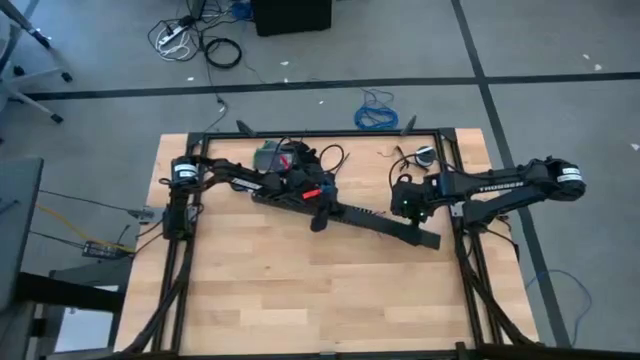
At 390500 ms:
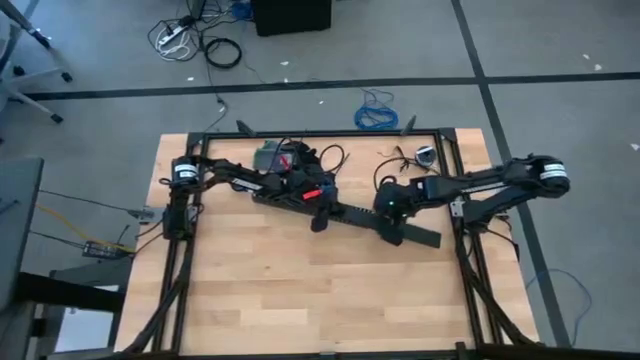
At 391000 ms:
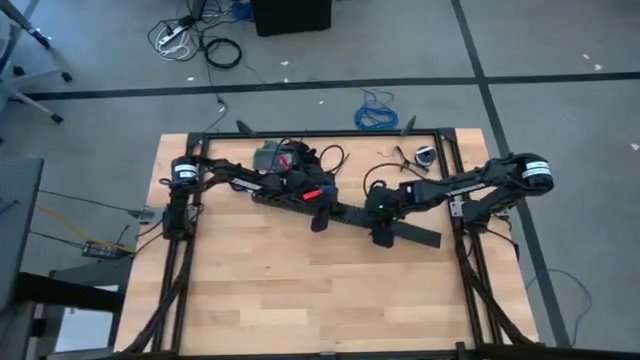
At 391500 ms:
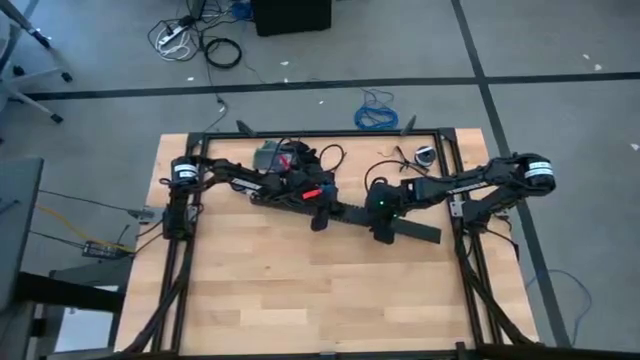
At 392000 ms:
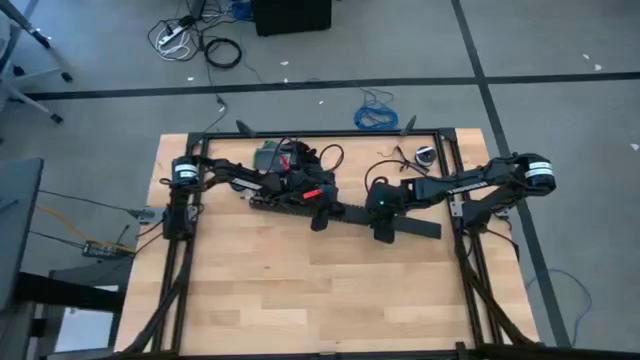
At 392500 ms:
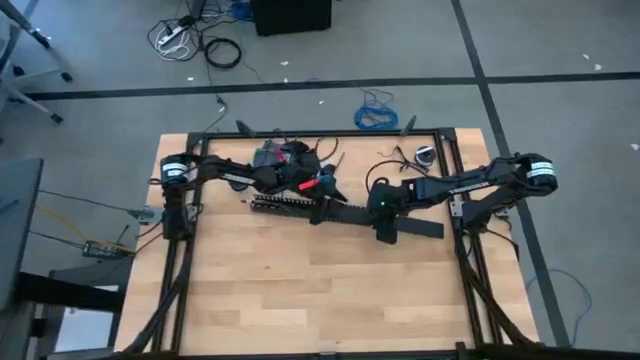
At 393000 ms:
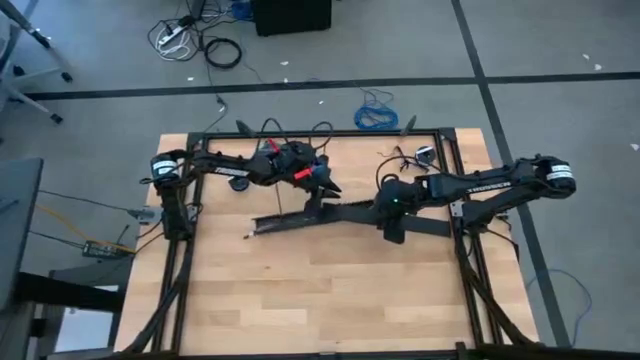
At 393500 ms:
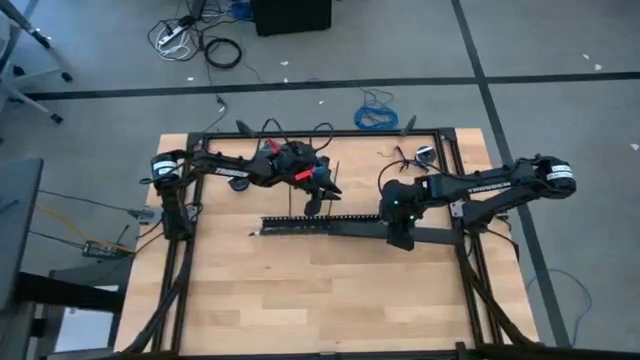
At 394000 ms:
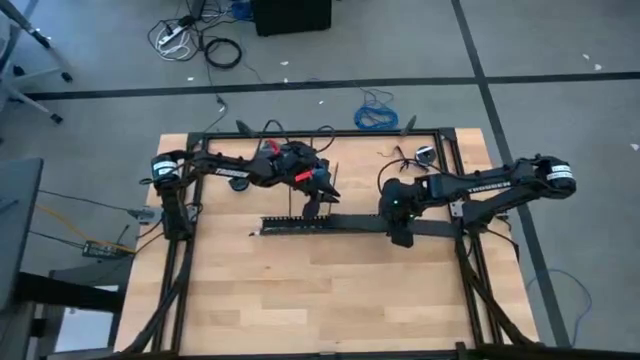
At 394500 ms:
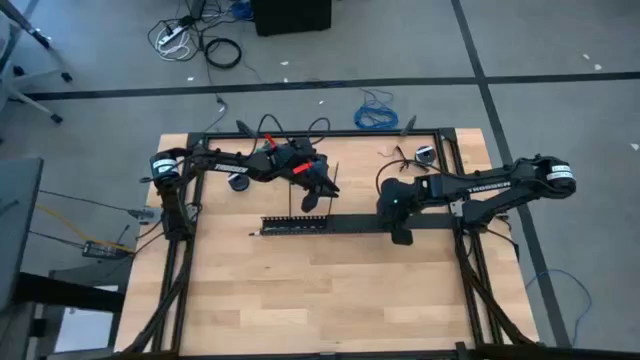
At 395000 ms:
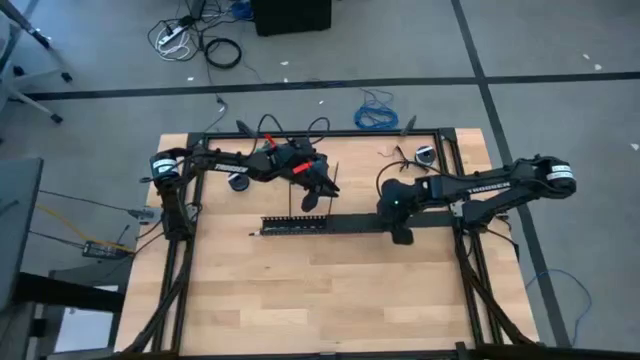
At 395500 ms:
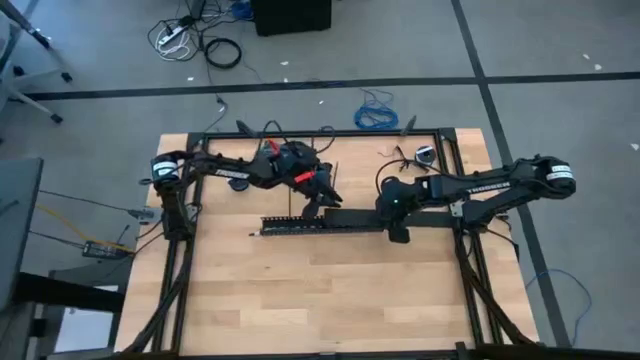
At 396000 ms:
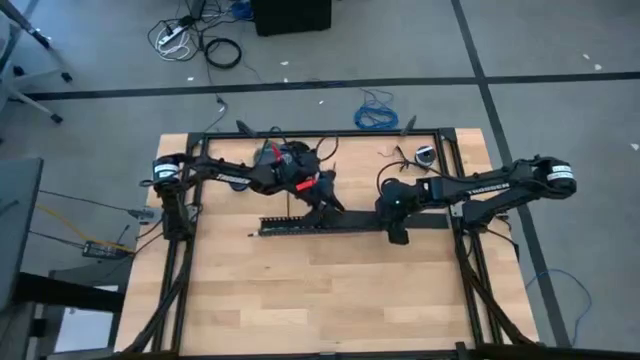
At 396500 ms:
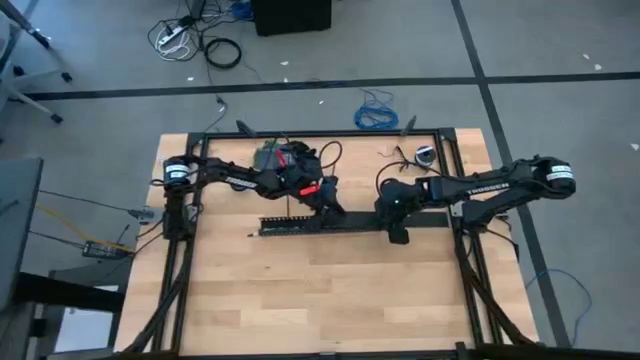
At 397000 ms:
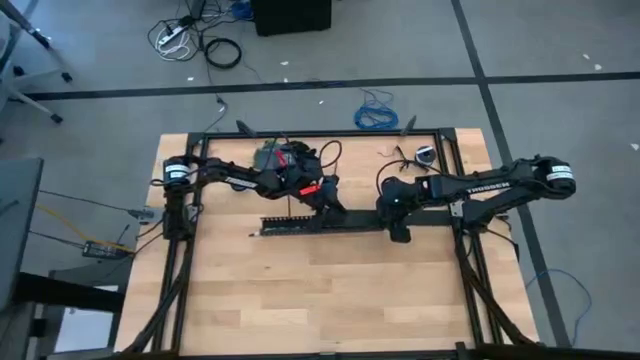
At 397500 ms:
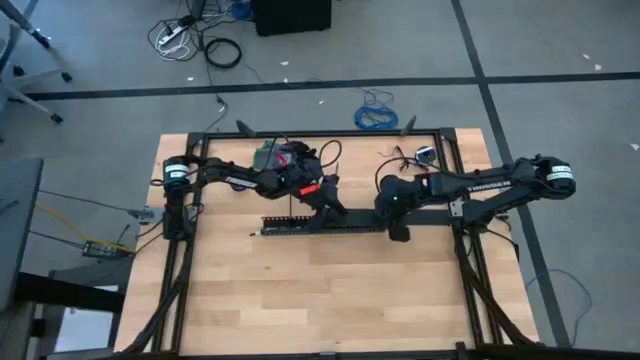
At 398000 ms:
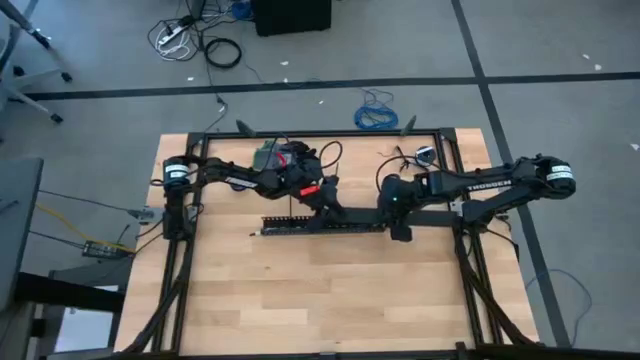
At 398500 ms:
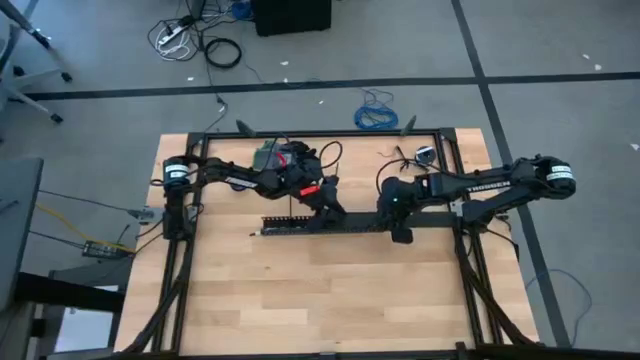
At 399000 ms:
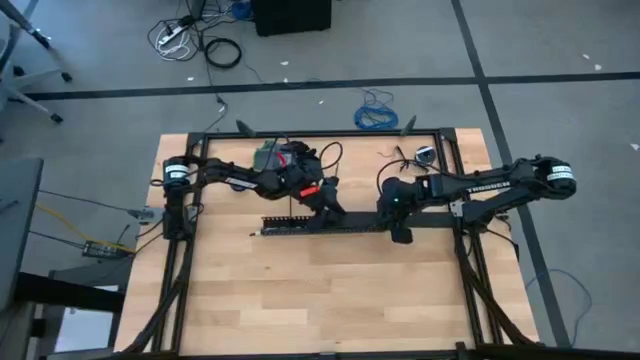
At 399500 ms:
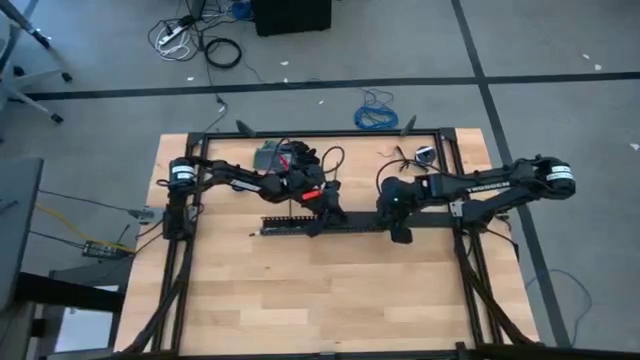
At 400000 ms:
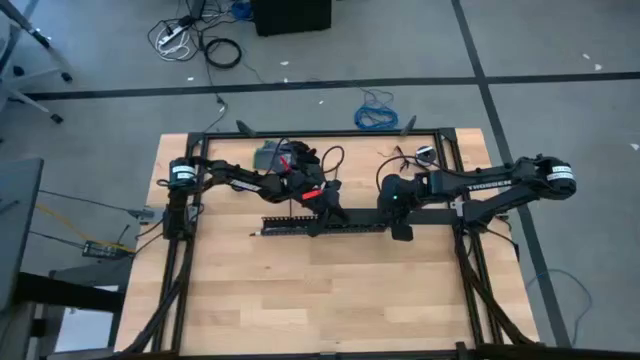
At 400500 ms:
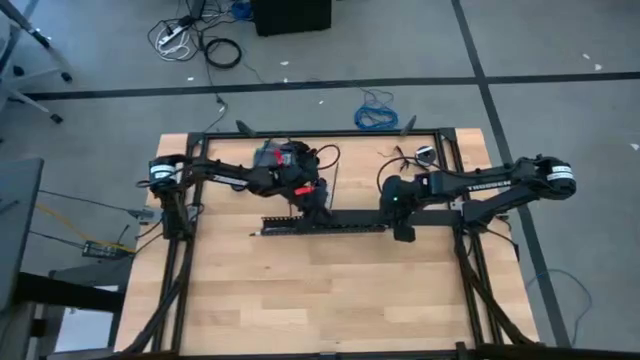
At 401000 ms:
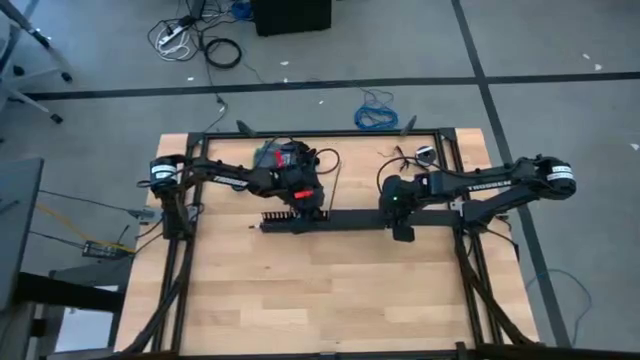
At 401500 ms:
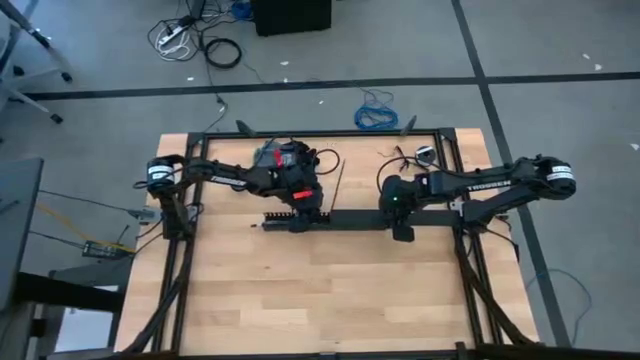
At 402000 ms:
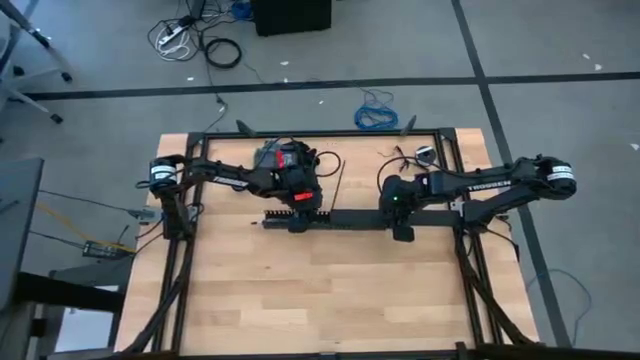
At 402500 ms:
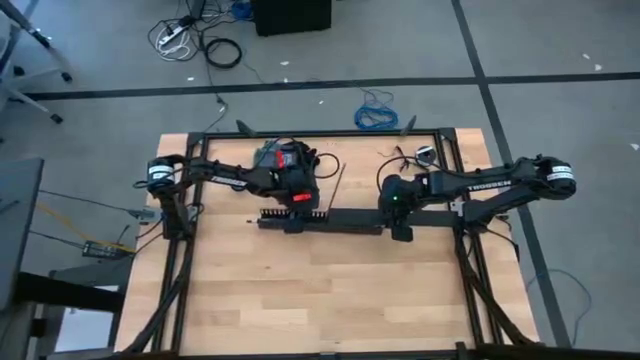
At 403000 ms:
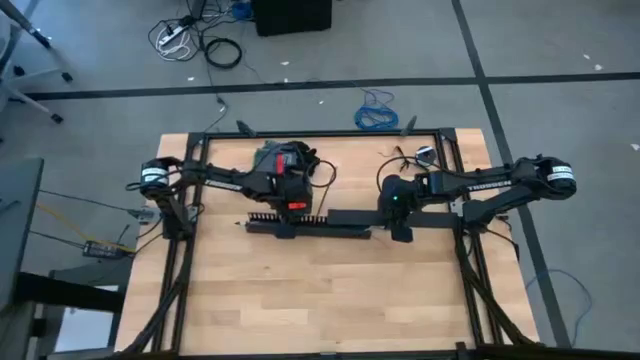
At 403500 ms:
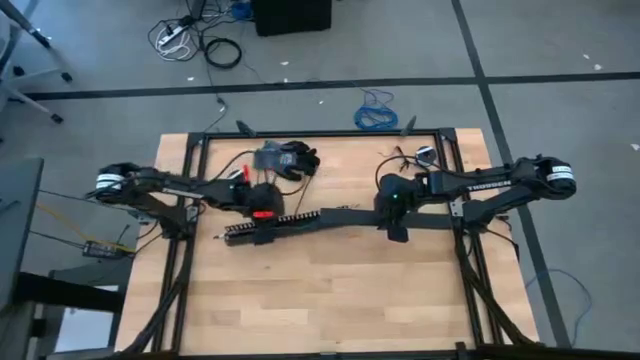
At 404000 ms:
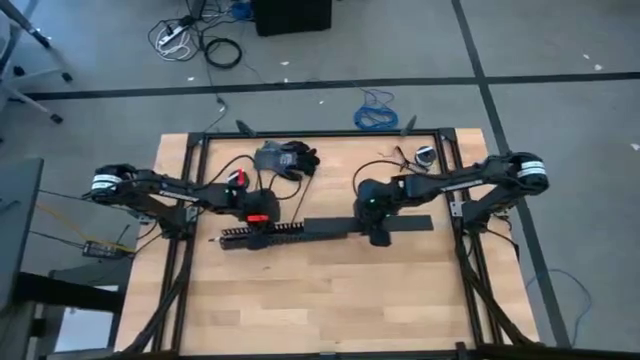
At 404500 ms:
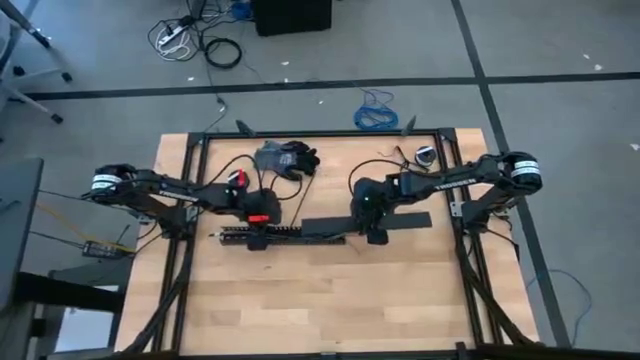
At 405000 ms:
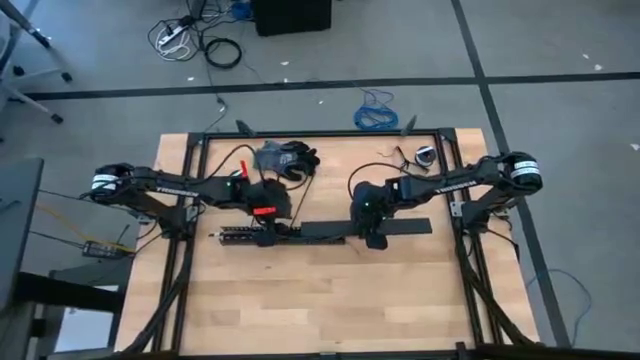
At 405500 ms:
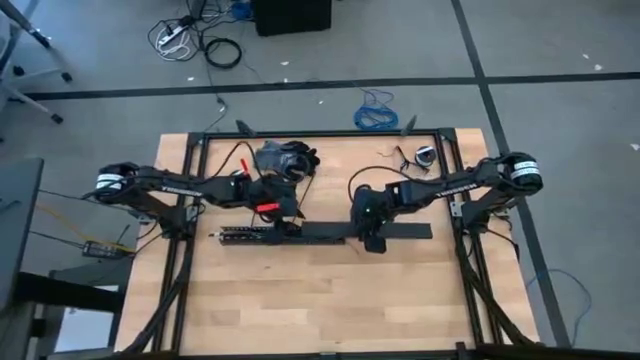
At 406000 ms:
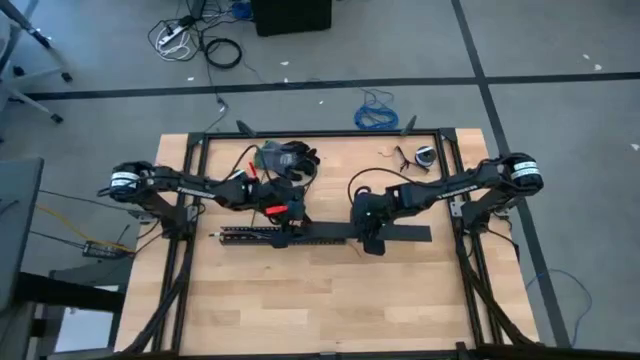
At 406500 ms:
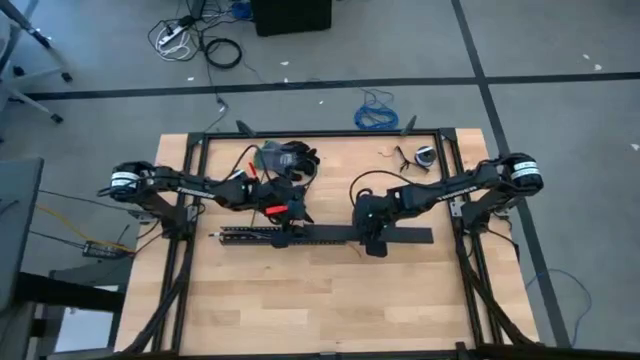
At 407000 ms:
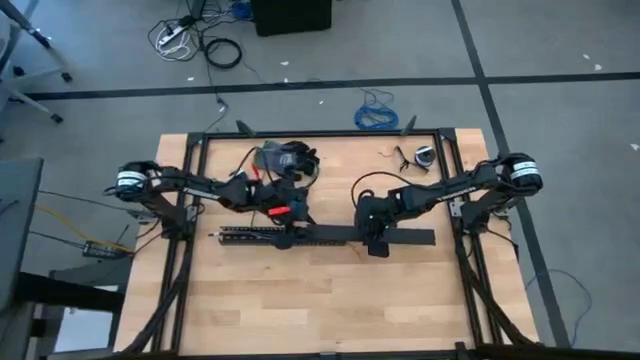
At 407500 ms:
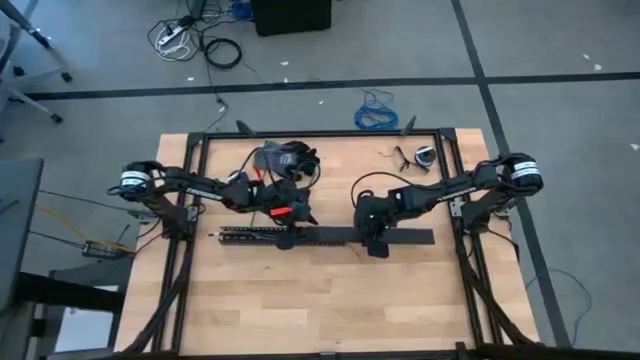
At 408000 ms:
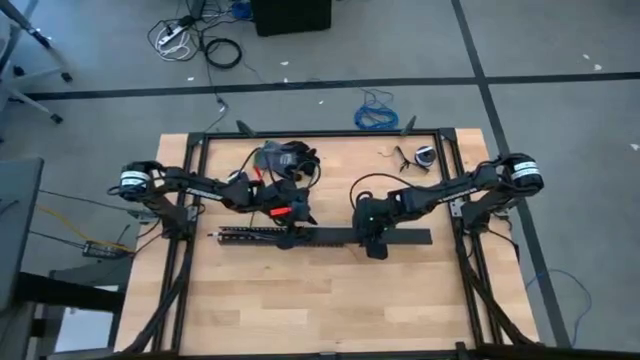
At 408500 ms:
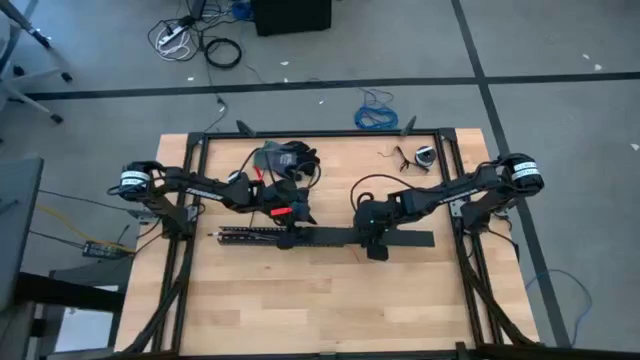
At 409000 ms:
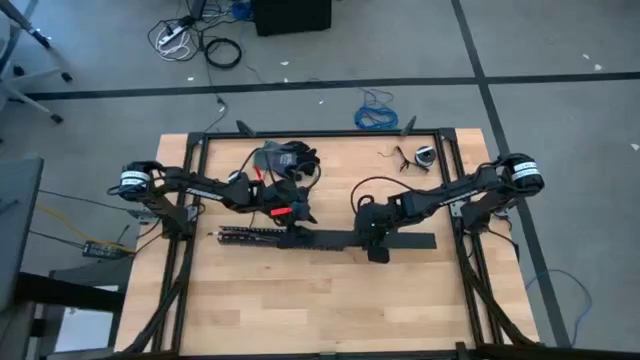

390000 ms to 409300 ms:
Task: Ziptie cables
Close the black cable duct cover

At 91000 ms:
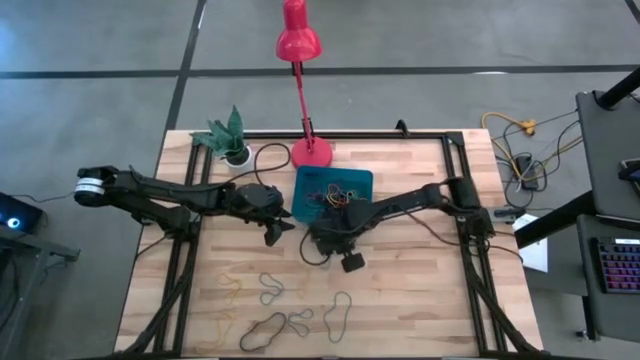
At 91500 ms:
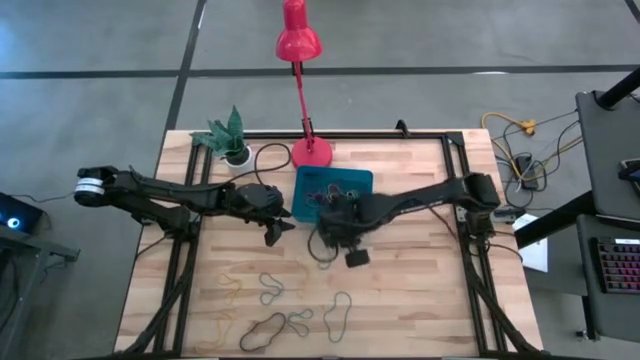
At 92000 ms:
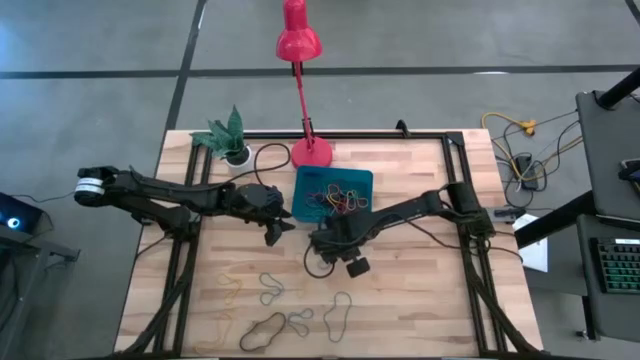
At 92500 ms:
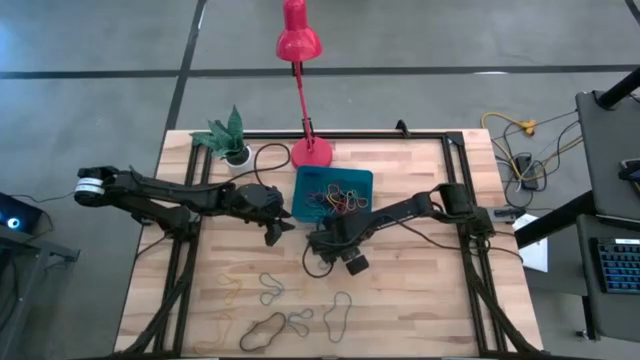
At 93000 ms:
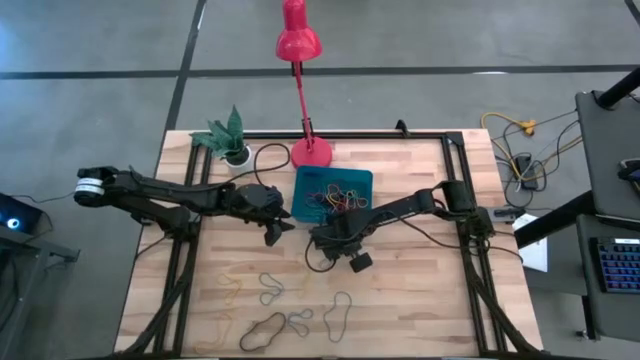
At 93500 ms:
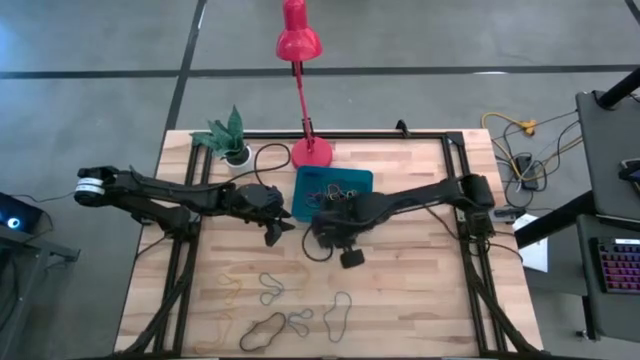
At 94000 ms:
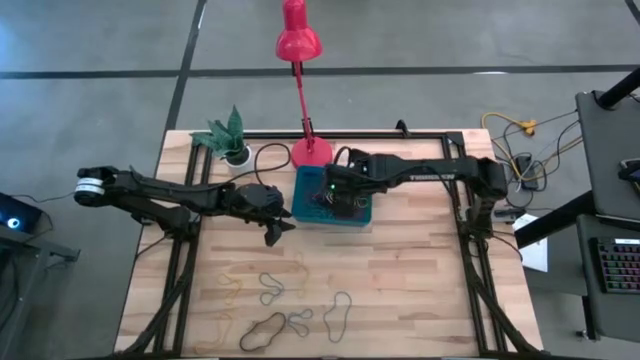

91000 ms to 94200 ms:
Task: Pick and place rubber bands into bin
Put the blue rubber band into the blue bin
